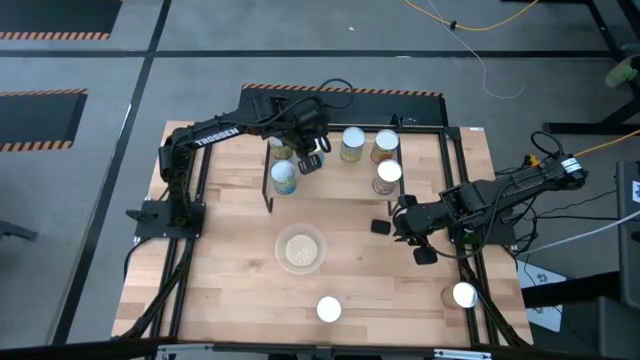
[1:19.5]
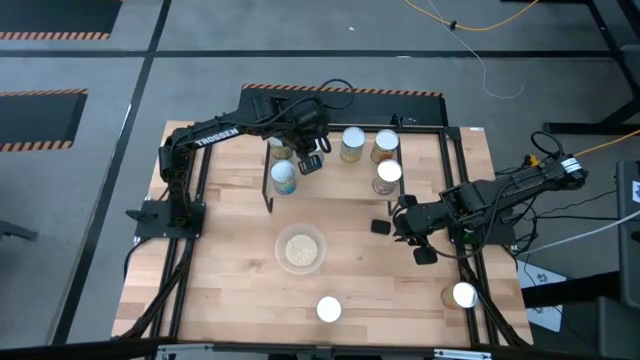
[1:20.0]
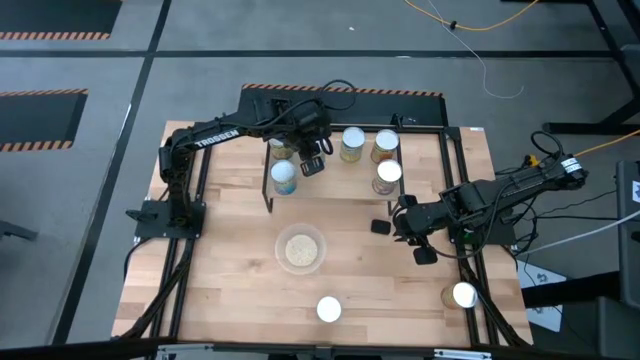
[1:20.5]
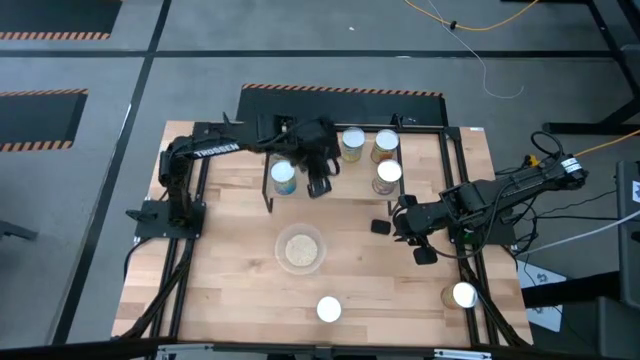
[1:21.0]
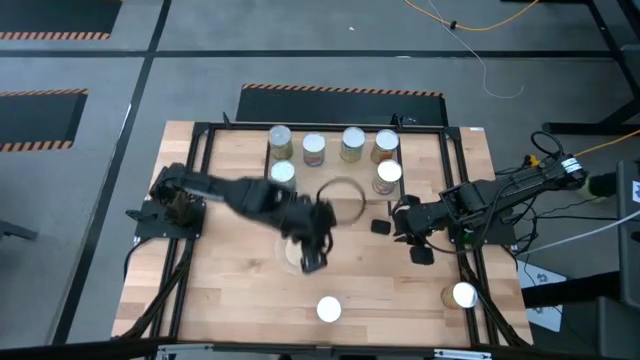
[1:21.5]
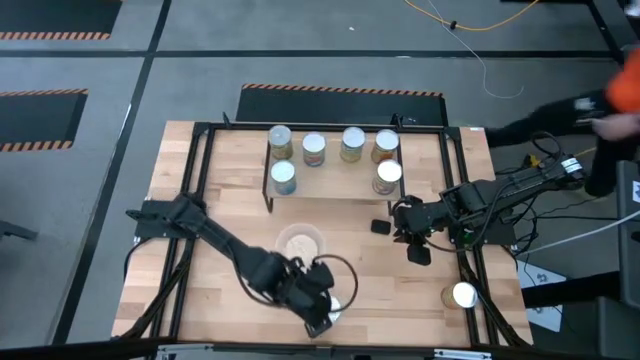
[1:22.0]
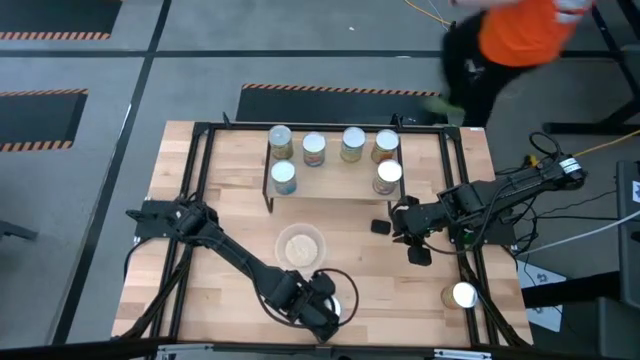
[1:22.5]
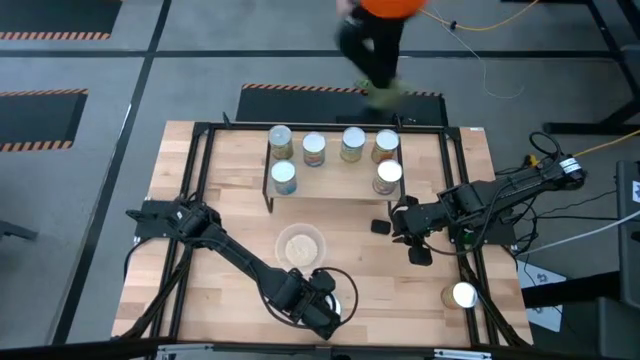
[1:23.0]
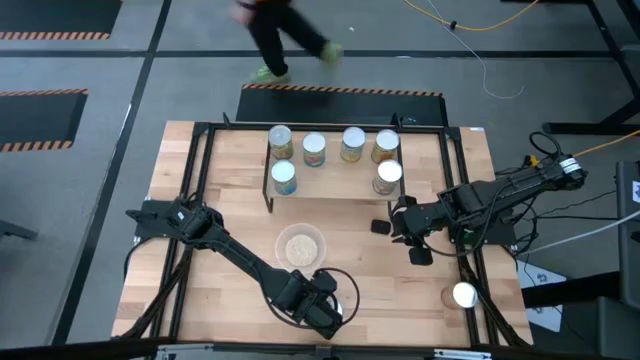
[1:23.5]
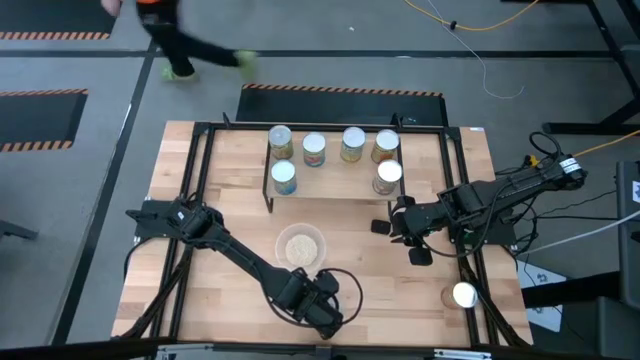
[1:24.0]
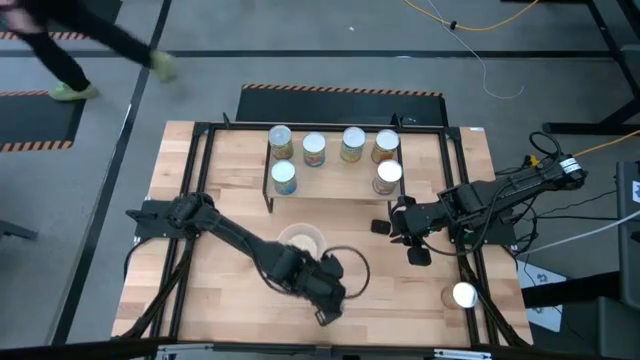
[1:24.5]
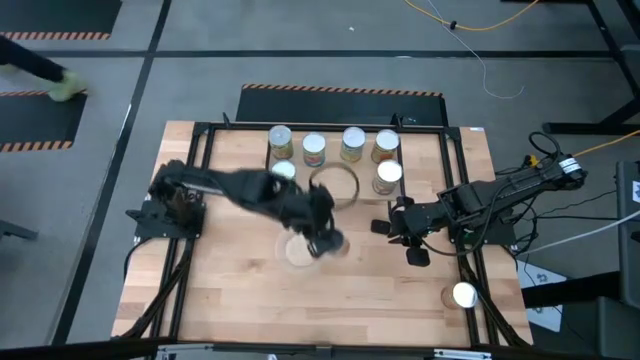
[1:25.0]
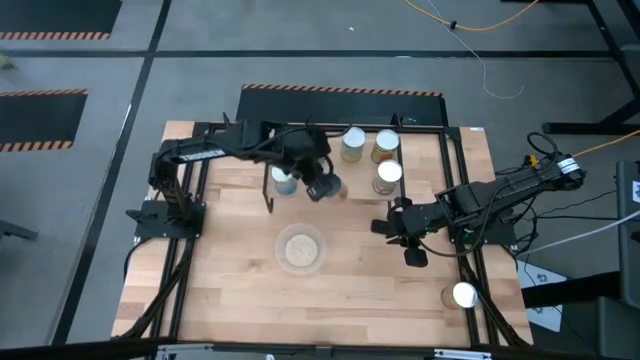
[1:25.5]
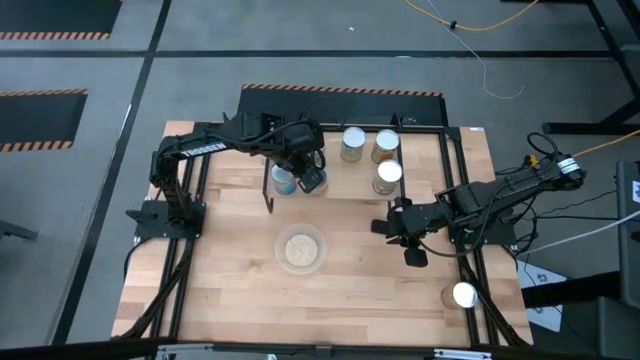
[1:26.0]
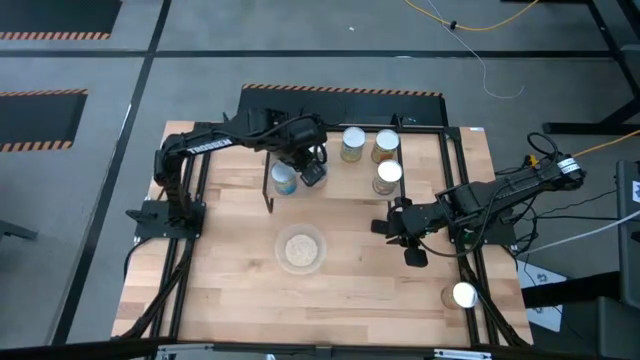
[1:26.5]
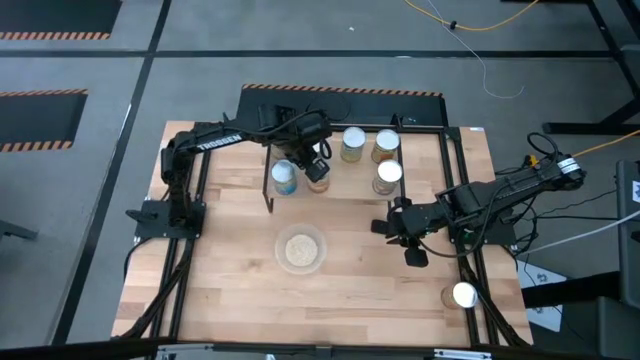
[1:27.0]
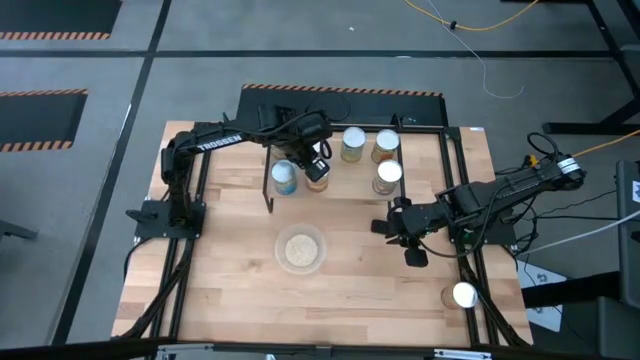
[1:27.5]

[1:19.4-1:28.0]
Task: Pick and place cans onto a shelf
Put the canned corn on the shelf

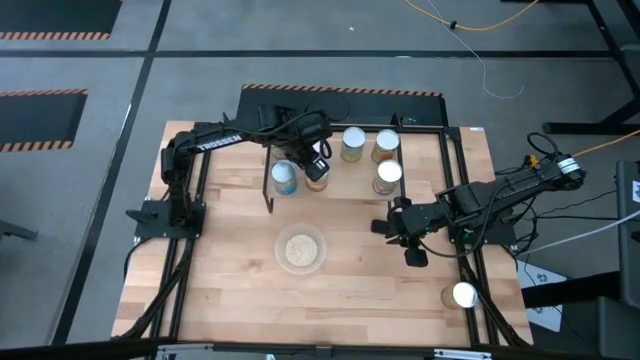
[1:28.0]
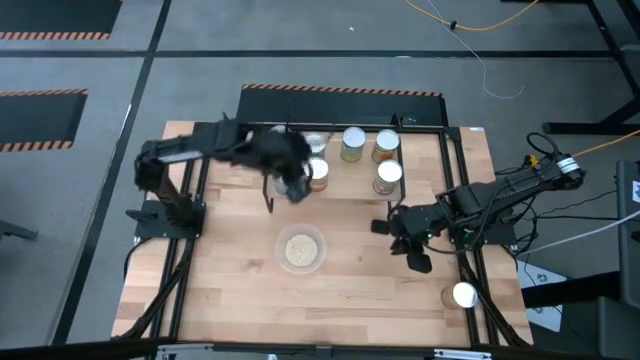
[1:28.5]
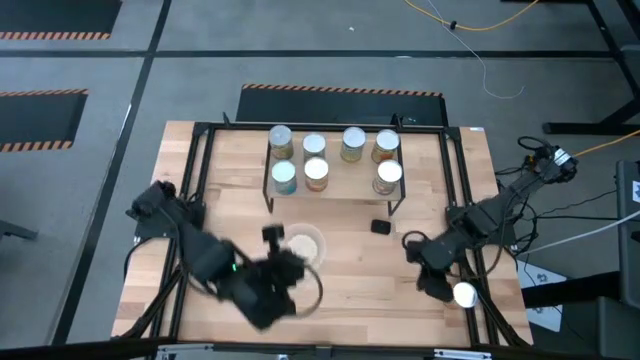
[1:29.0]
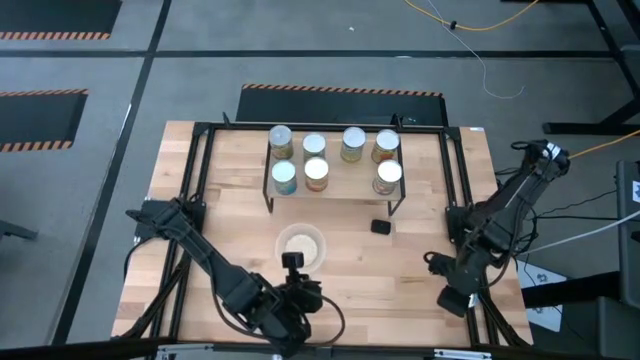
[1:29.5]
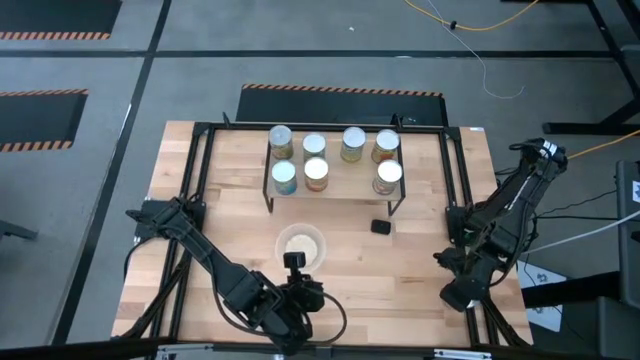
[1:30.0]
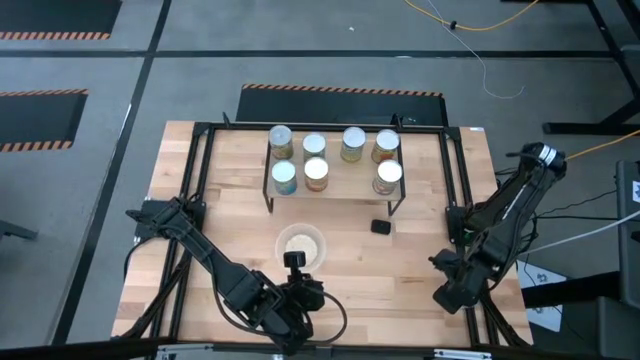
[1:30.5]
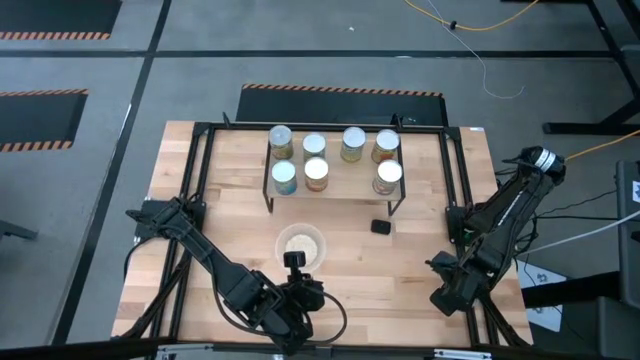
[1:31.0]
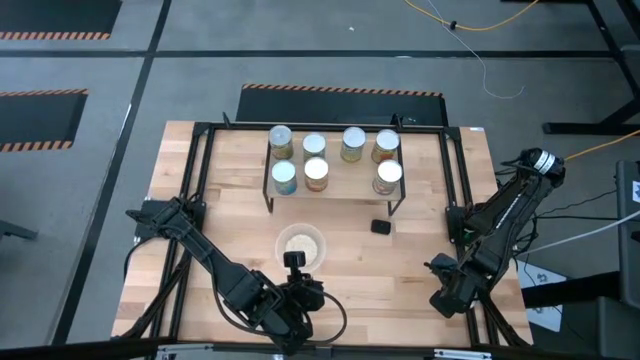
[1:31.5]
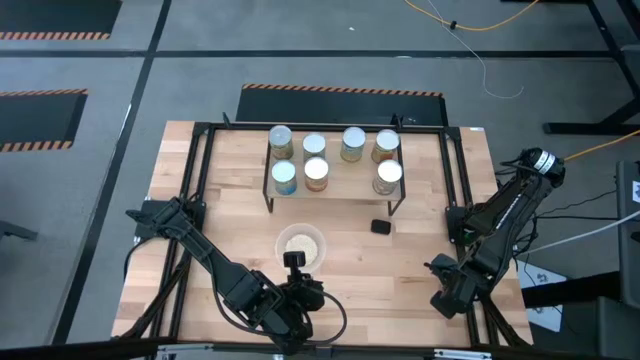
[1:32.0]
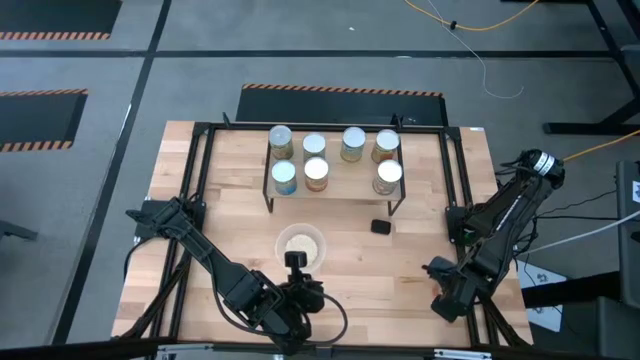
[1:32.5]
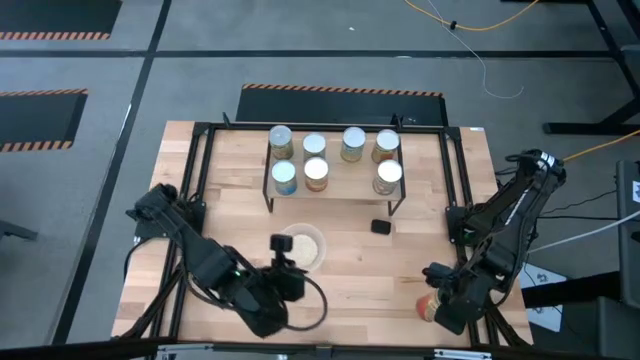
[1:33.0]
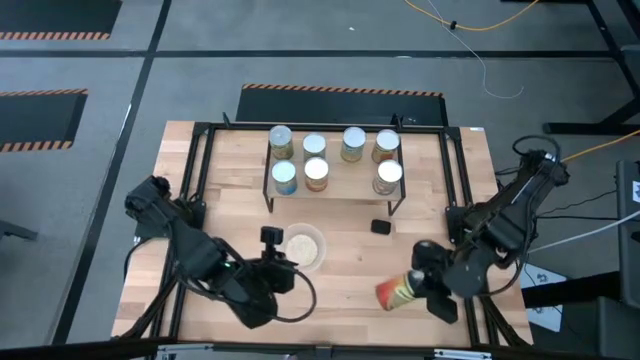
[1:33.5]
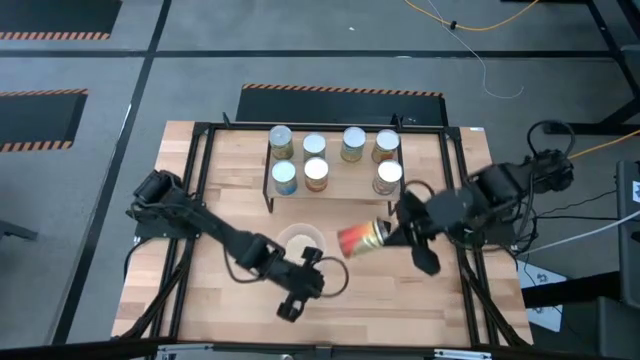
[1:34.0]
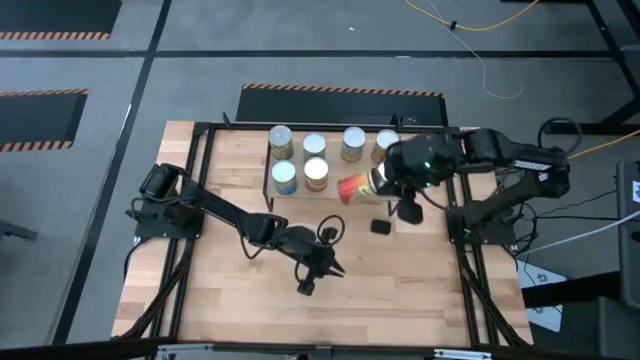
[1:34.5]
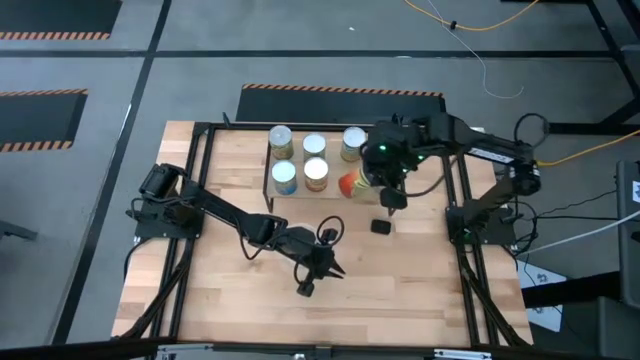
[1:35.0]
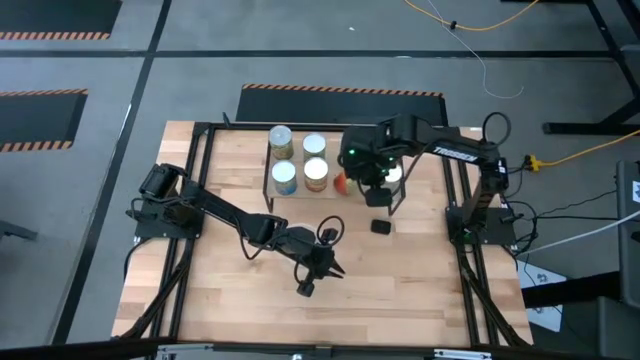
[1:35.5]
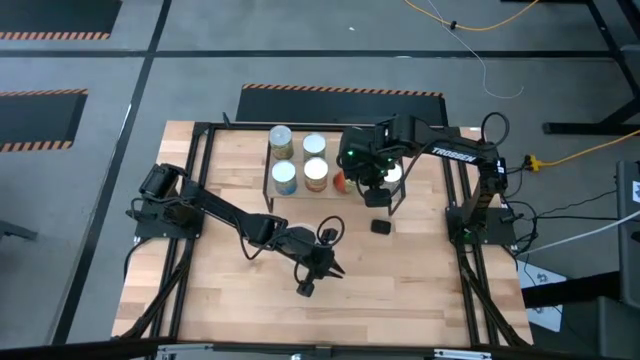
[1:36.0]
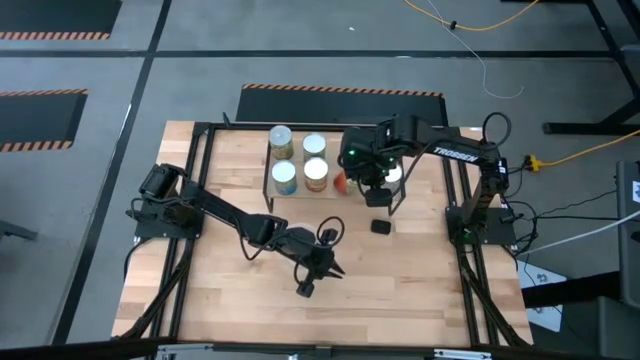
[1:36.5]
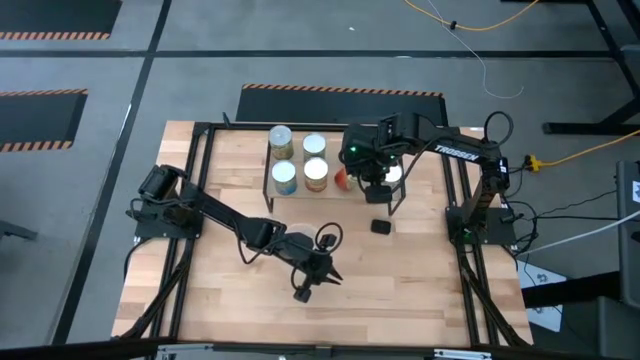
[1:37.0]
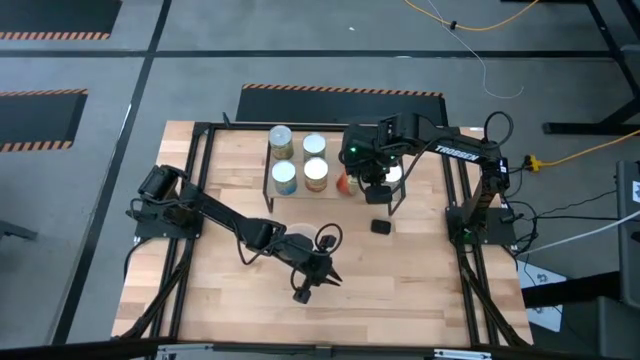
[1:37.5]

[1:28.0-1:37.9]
Put the canned green beans on the shelf

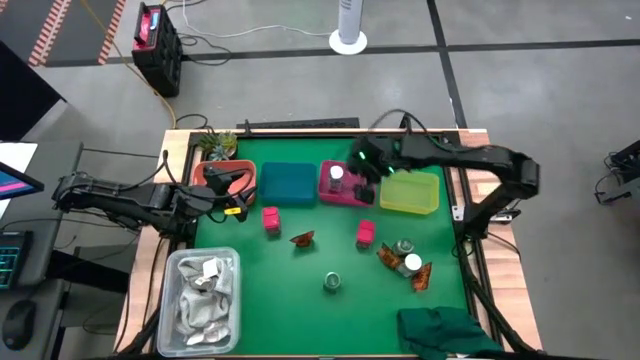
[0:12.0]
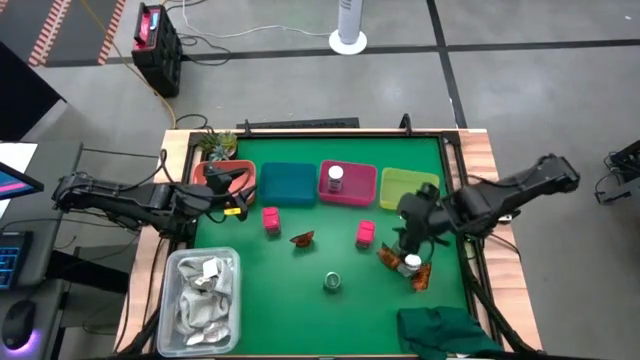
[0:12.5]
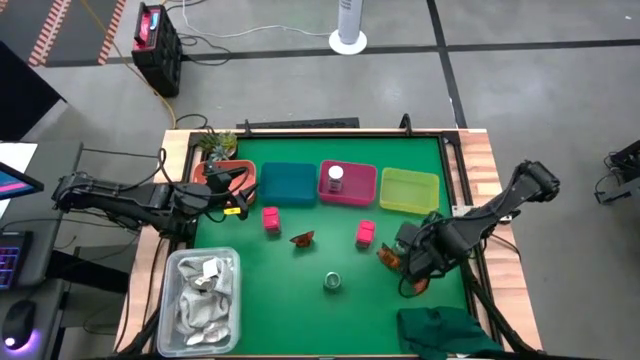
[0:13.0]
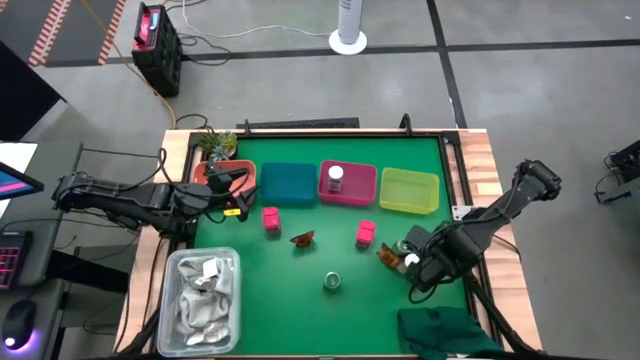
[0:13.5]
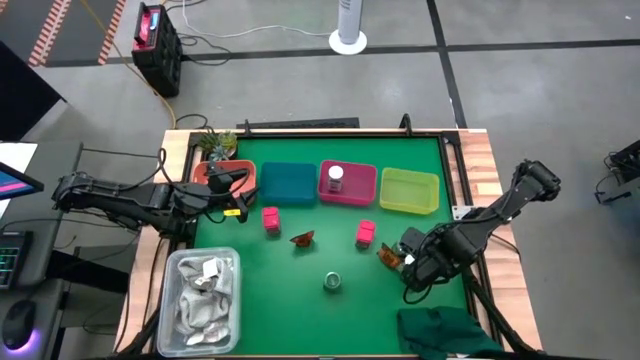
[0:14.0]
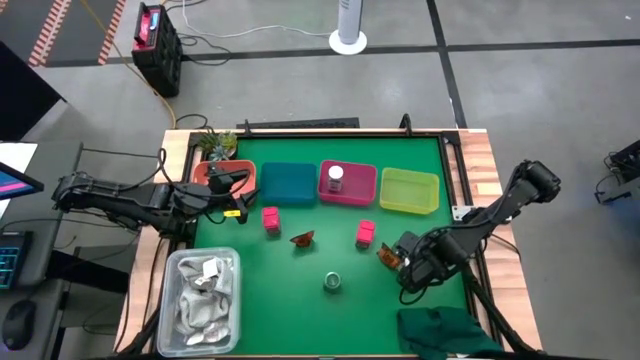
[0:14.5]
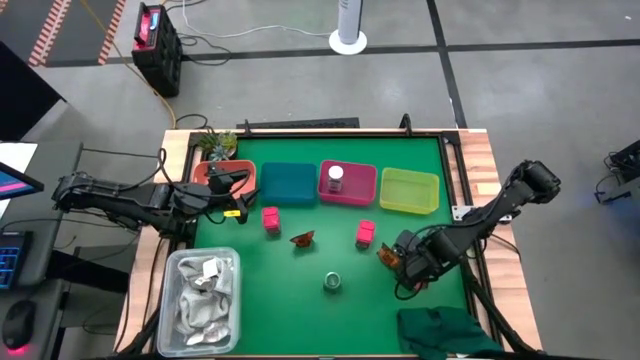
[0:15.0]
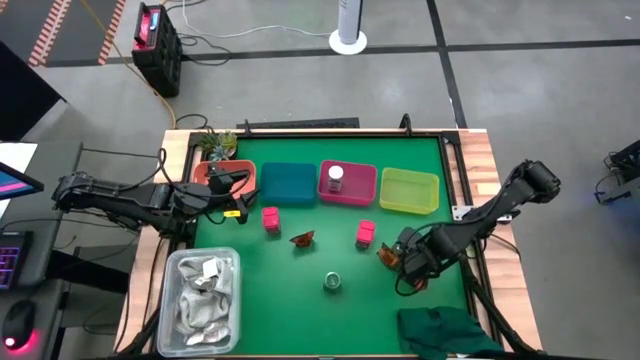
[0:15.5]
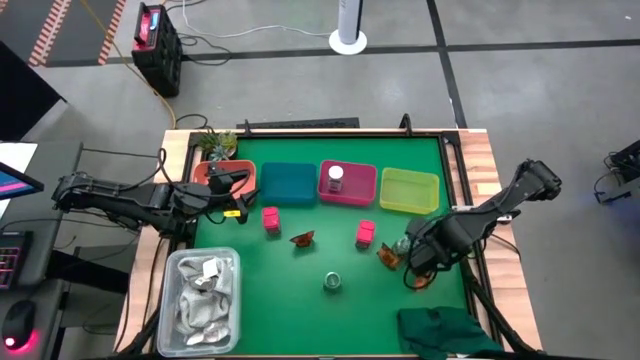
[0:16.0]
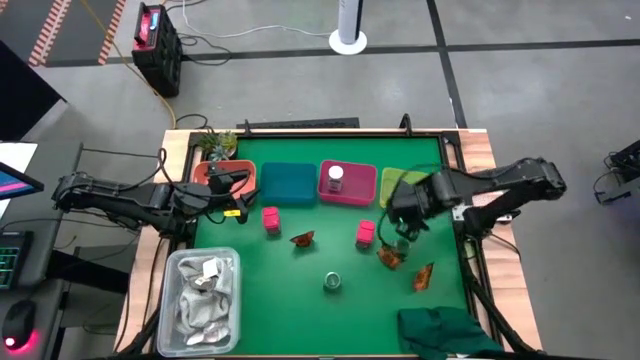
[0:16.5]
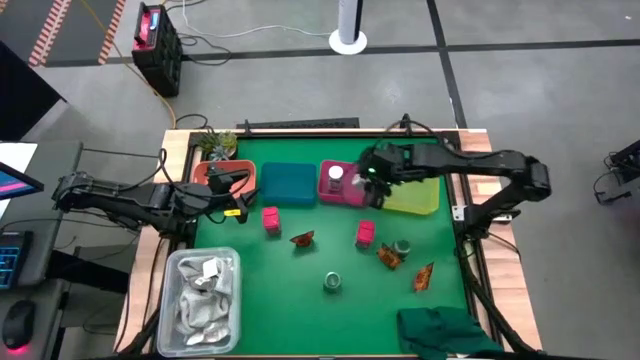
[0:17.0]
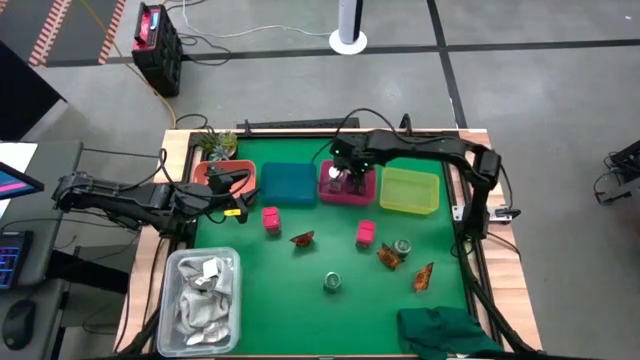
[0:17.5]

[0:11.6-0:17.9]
Task: Sort spices by type
Put the white seasoning bottle into the red bin
